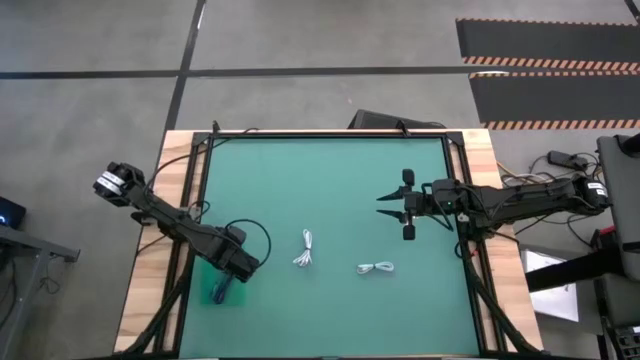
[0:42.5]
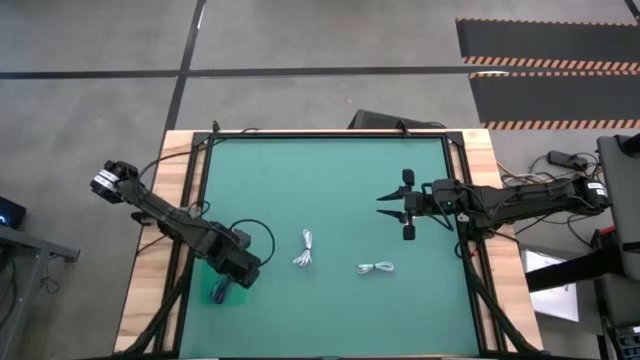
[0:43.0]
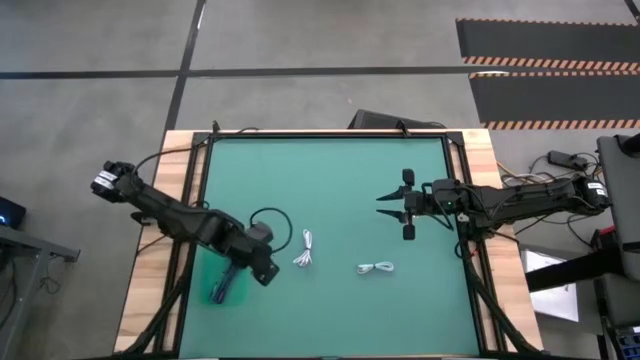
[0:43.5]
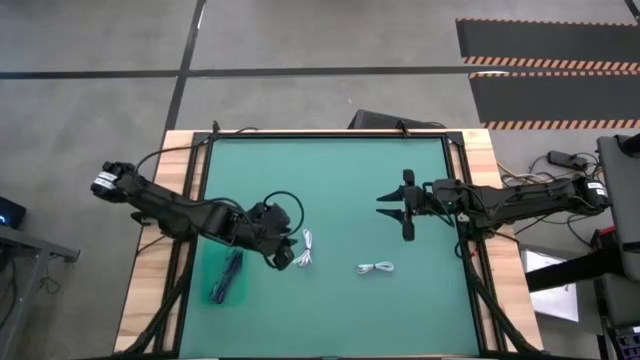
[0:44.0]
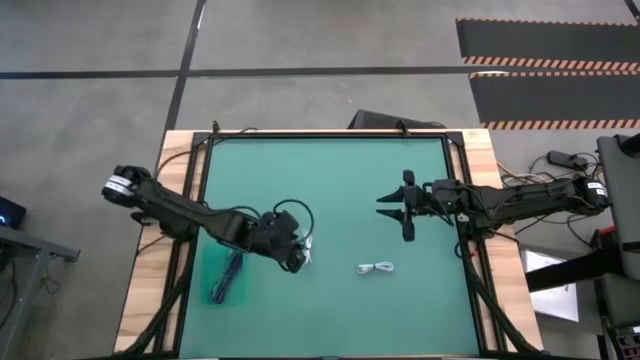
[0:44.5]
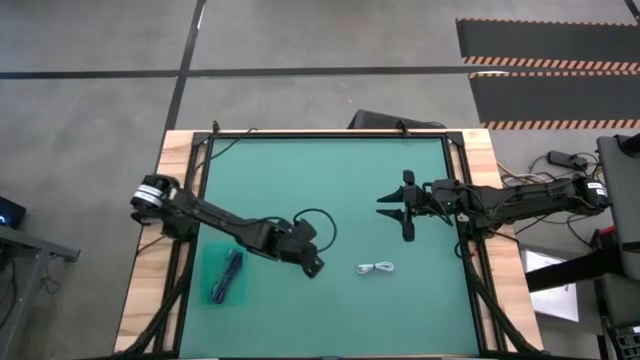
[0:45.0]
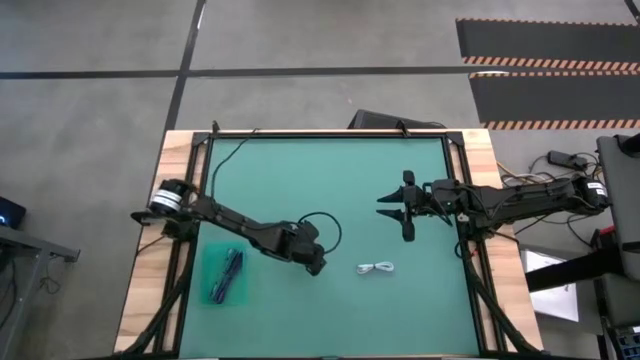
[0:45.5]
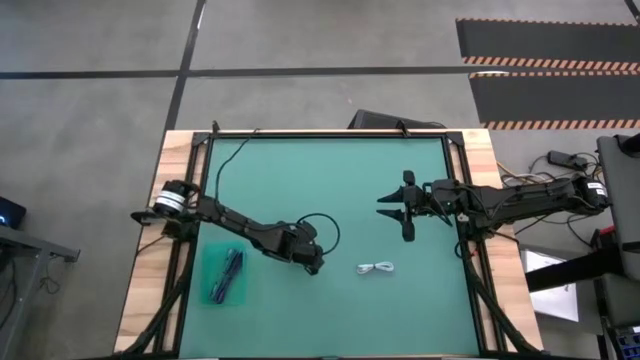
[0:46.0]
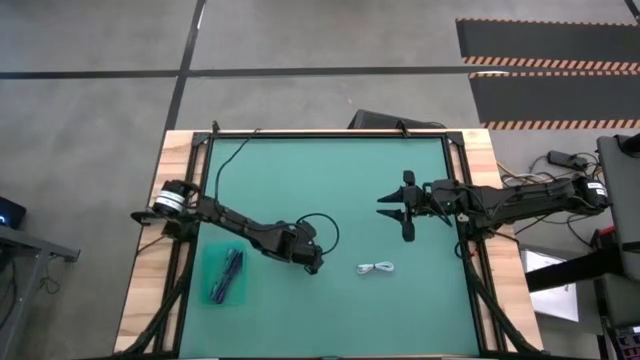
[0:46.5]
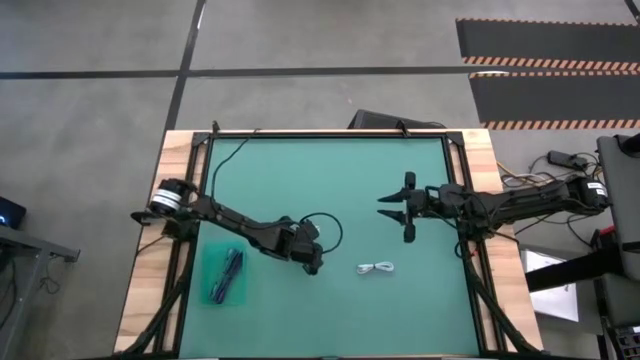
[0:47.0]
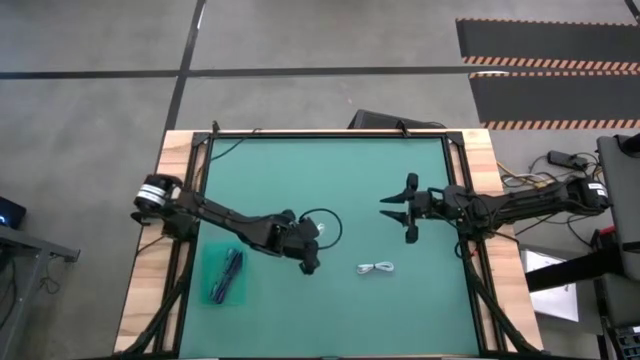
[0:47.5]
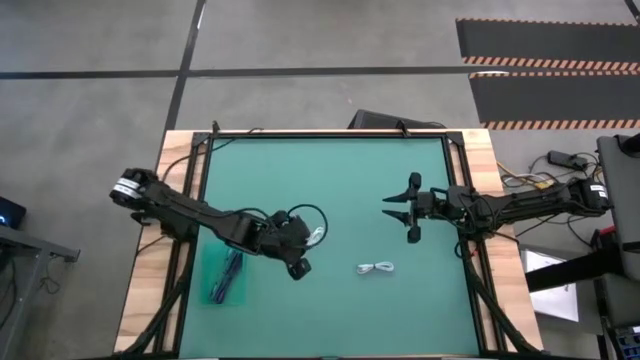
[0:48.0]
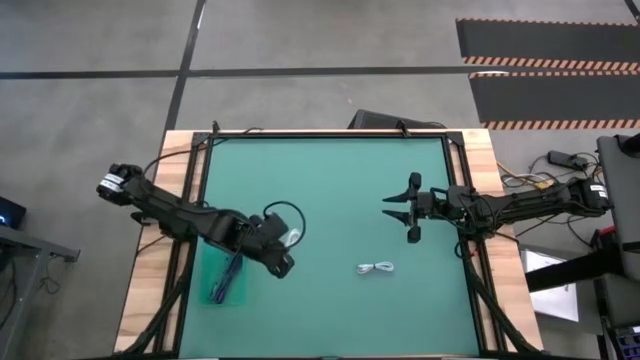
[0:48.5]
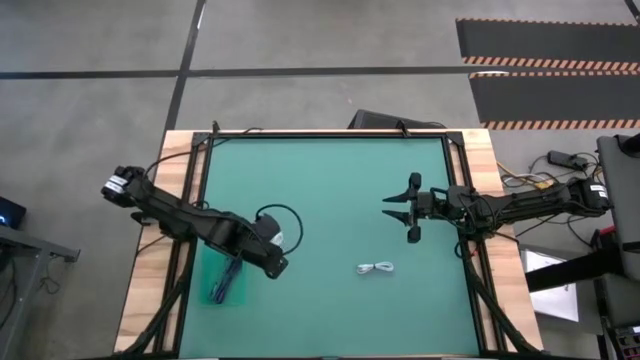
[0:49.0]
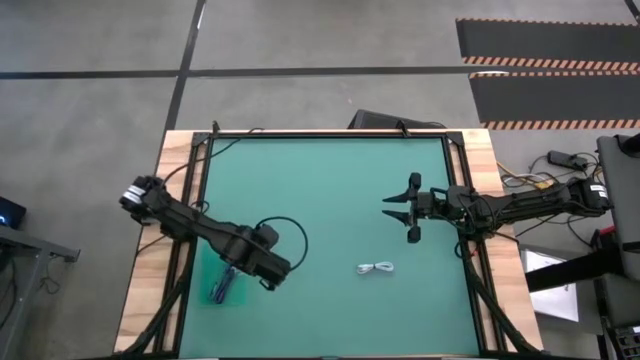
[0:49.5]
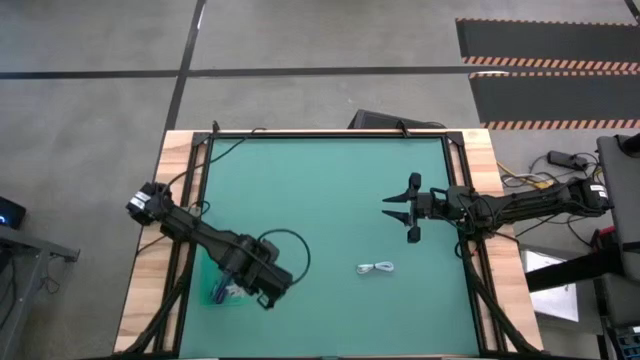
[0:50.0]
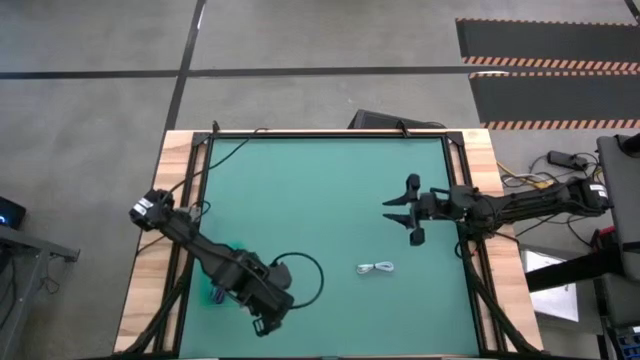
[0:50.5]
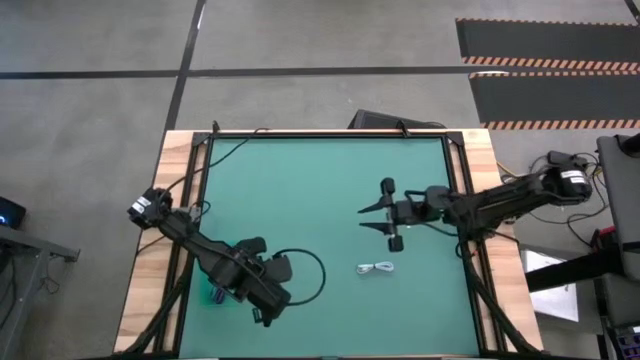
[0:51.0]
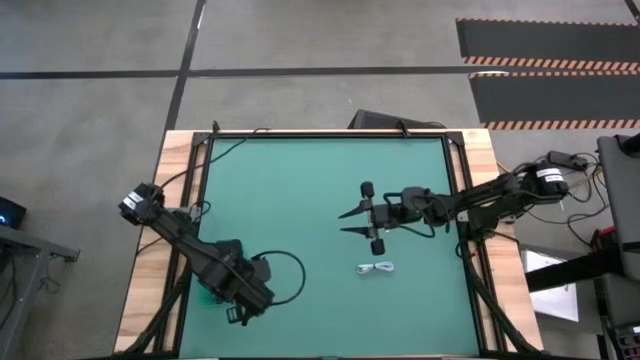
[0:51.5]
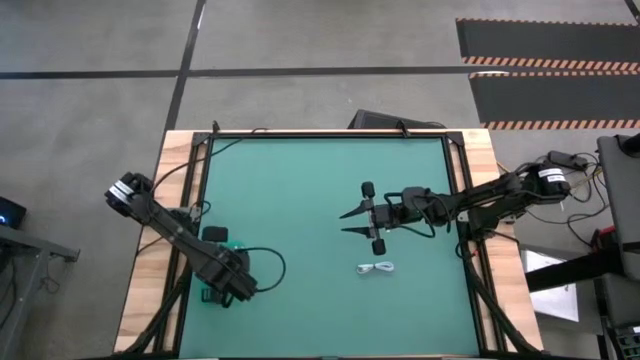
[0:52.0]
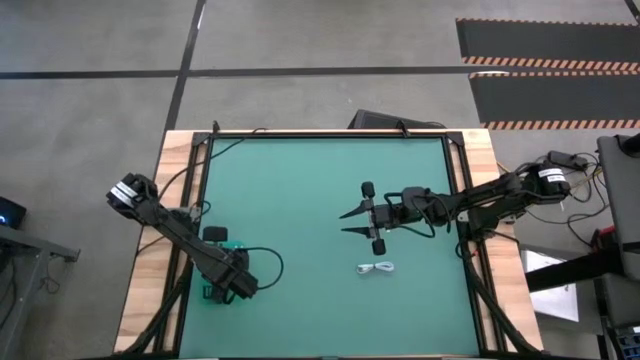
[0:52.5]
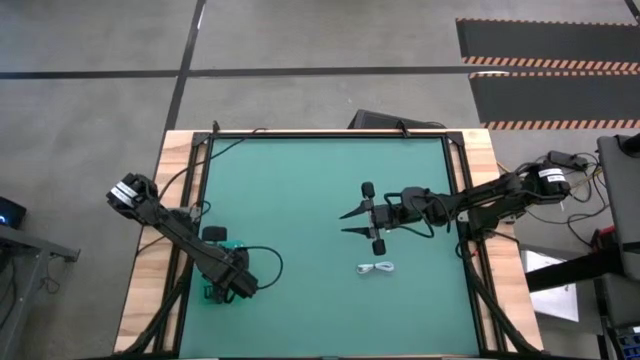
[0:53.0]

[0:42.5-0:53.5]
Task: Pick and place USB-C Cables
Put the left white charger cable in the green bin

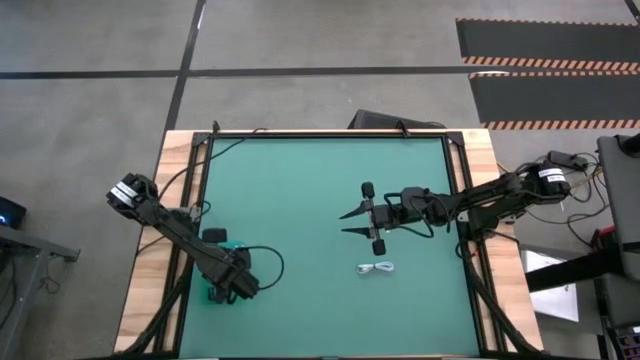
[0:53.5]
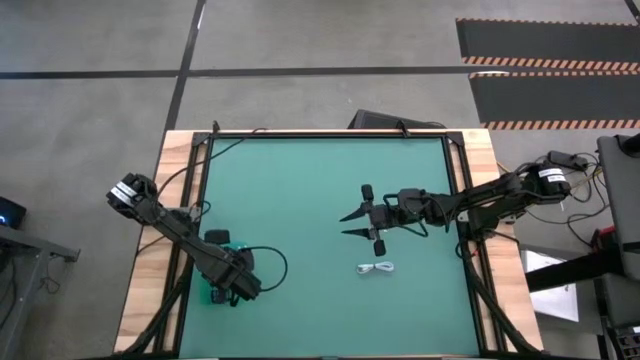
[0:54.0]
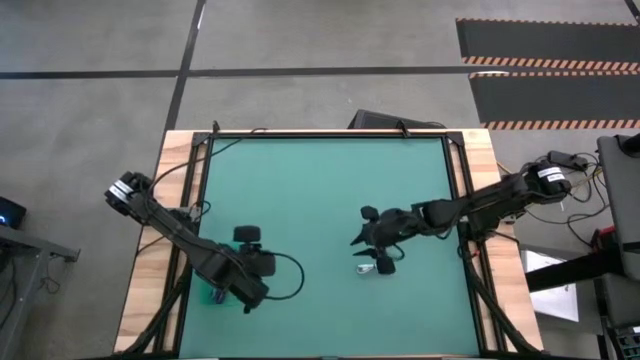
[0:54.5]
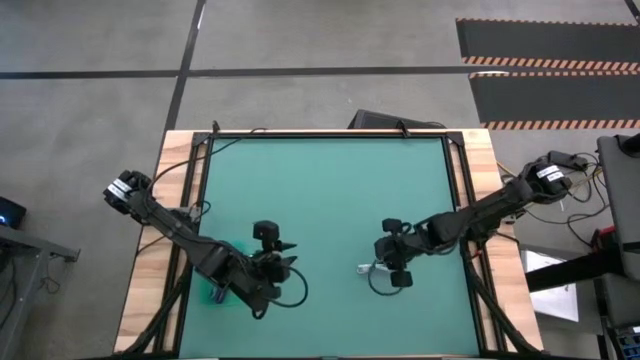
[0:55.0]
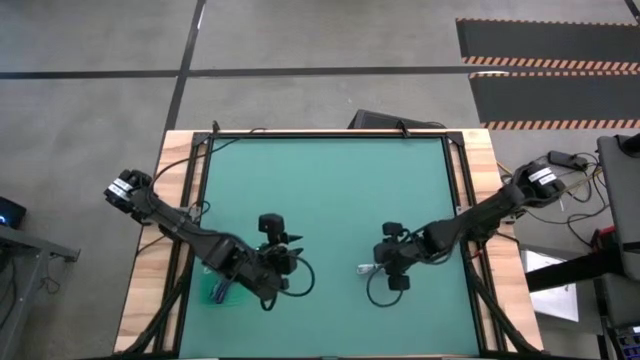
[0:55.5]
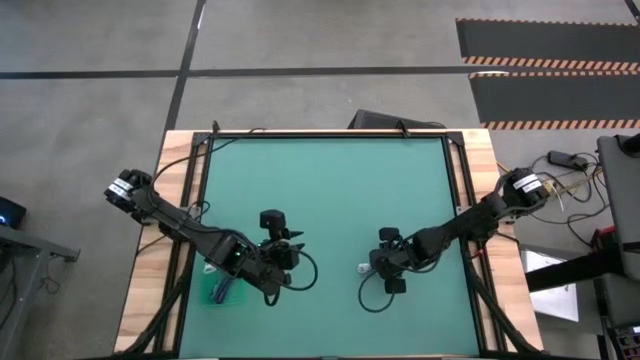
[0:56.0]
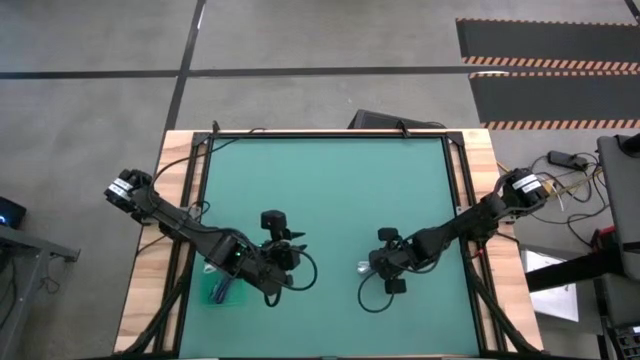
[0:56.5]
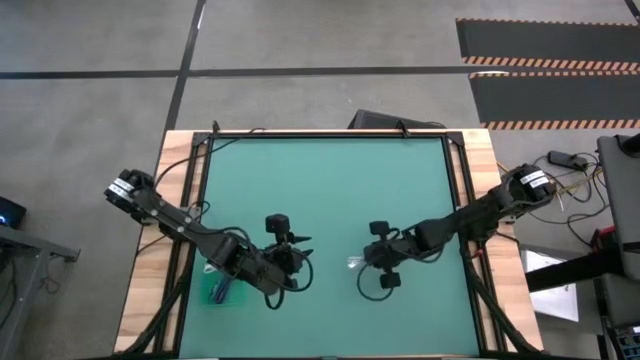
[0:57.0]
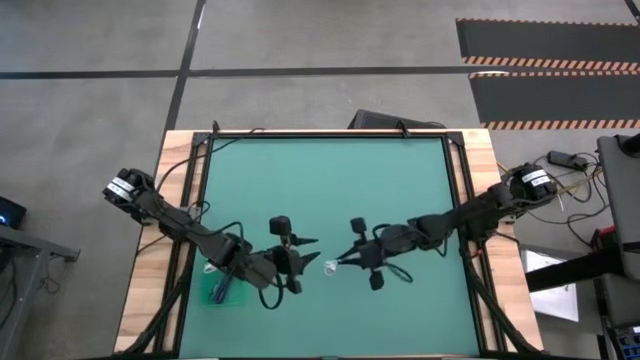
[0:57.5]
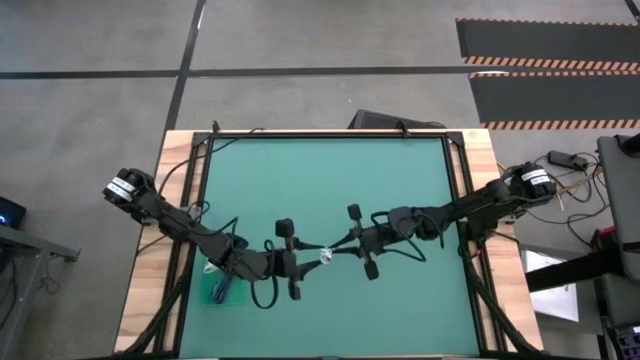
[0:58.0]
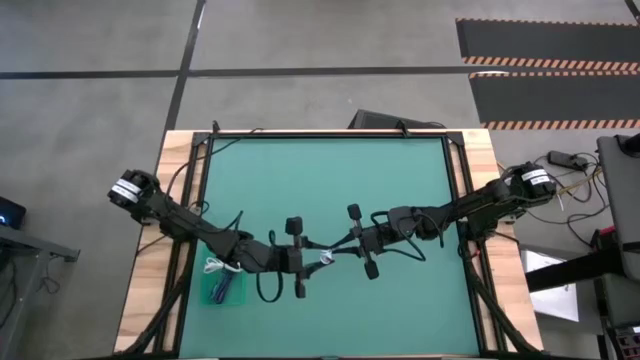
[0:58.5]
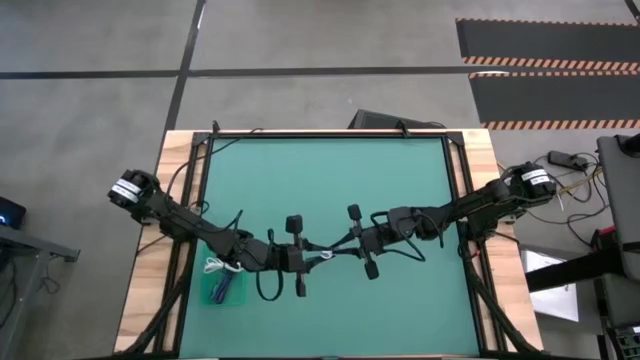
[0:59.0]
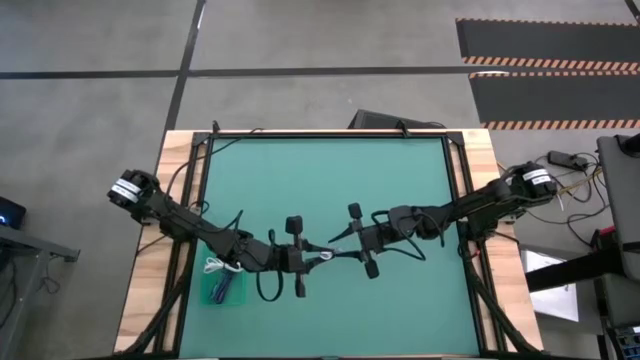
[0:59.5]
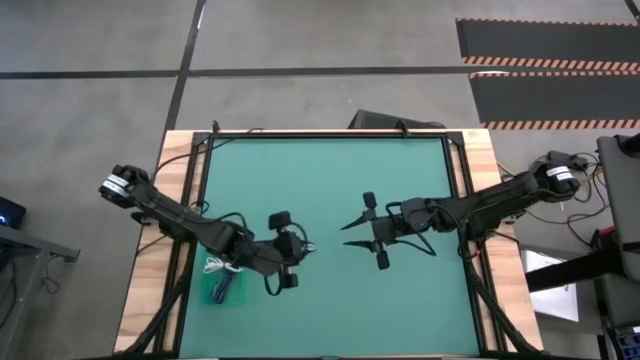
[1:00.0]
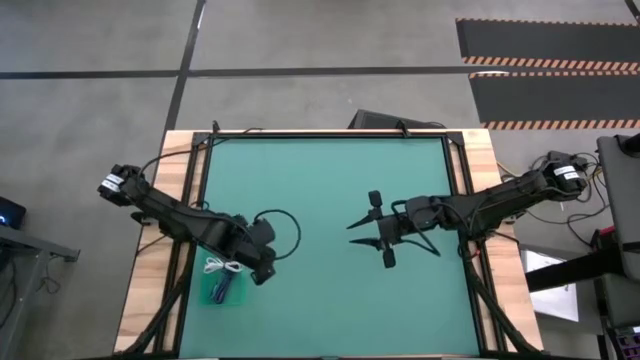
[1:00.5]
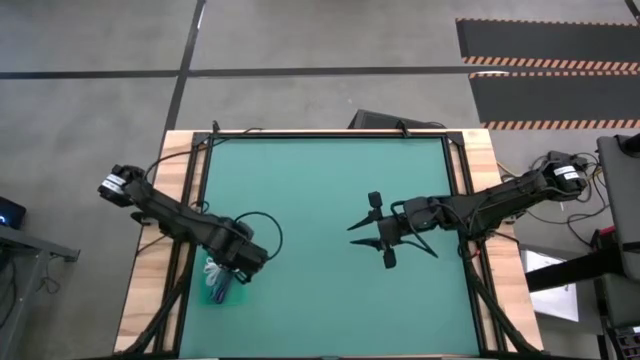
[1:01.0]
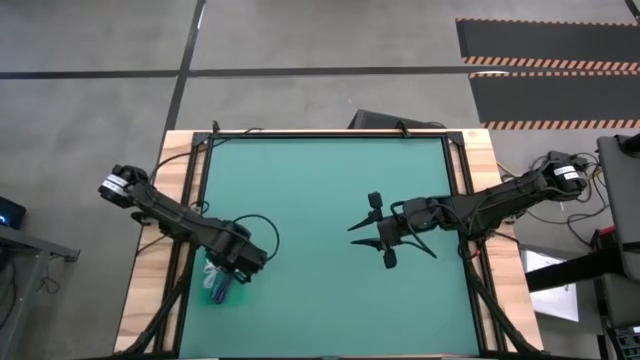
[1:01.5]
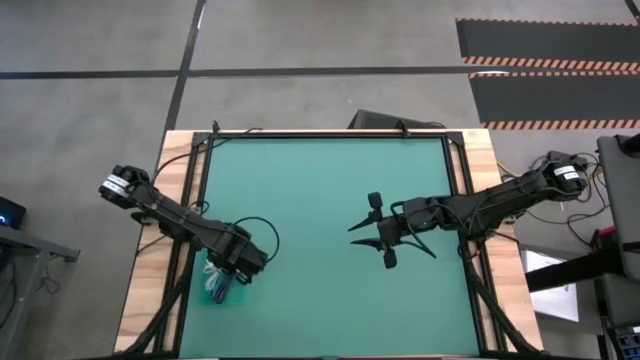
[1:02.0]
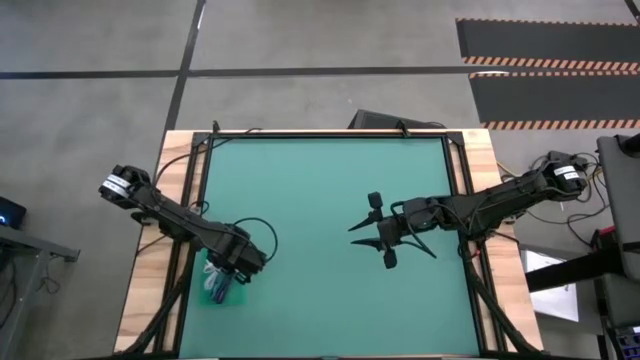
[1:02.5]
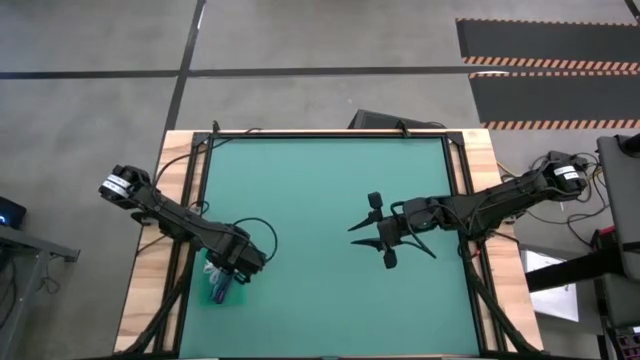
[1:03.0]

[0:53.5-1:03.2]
Put the white charger cable in the green bin
